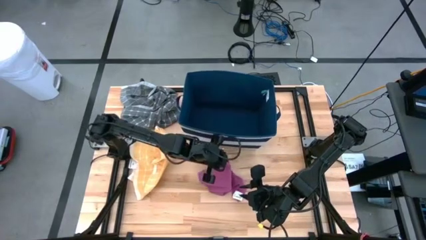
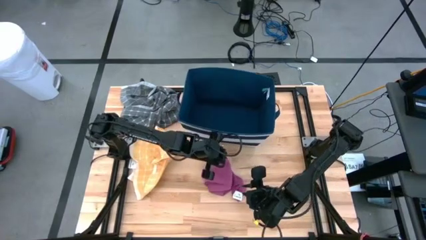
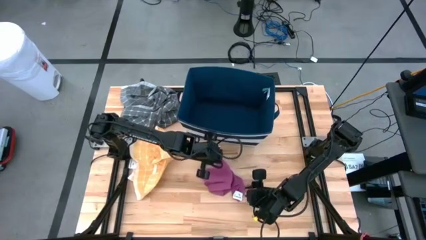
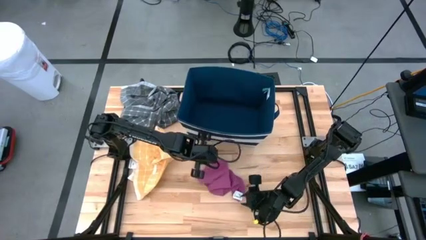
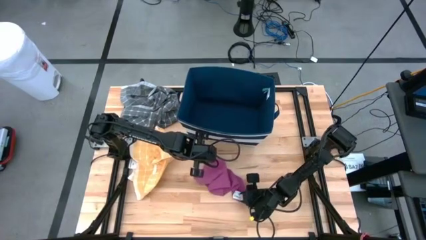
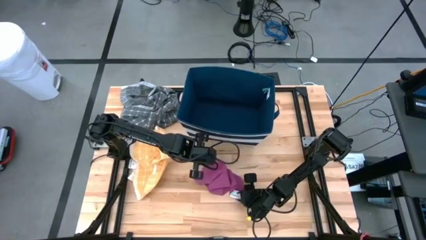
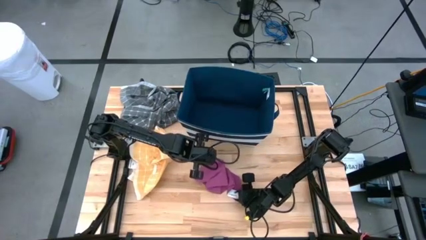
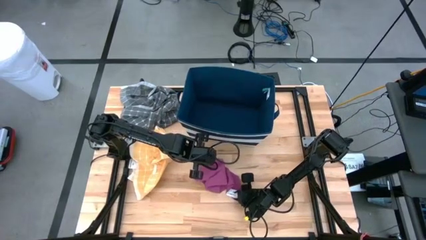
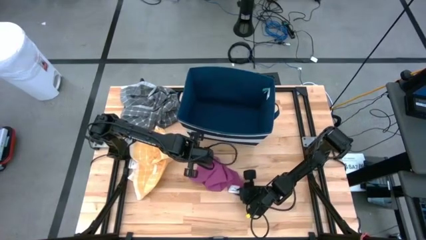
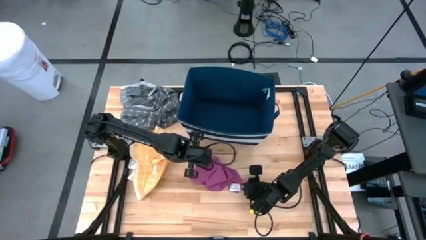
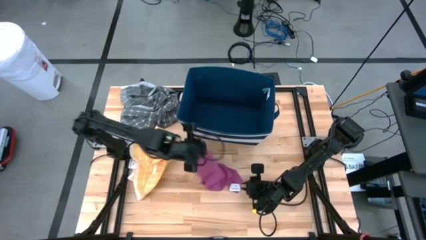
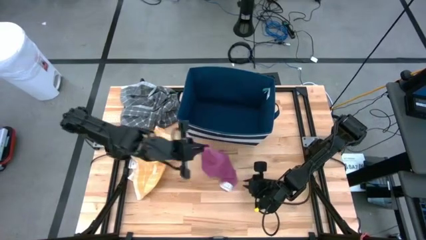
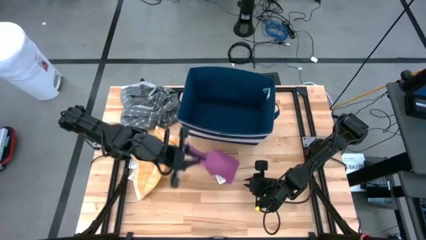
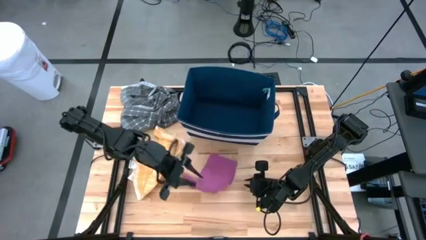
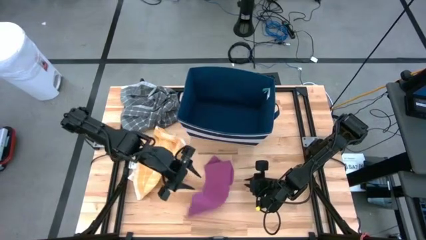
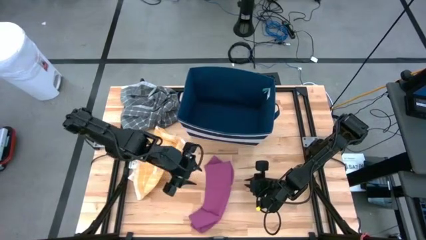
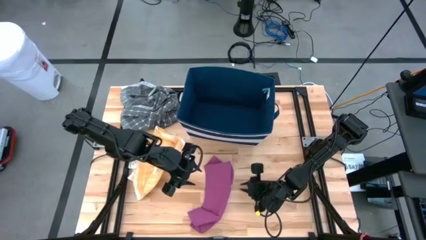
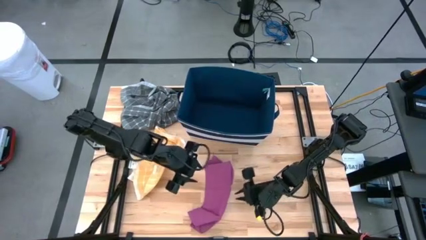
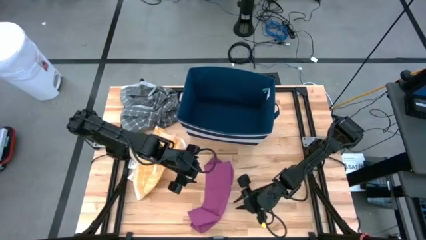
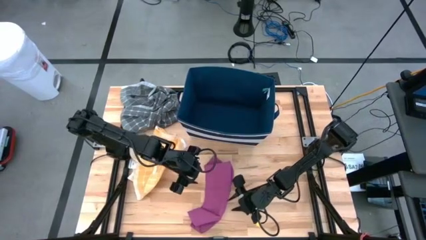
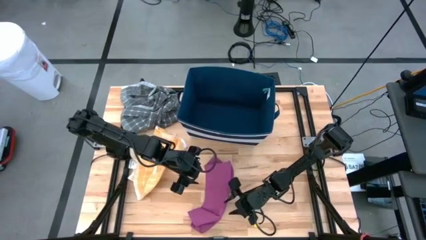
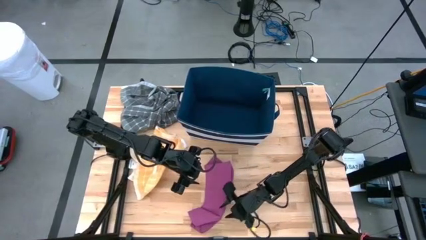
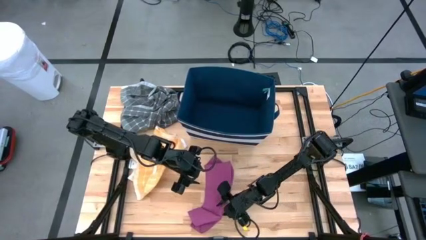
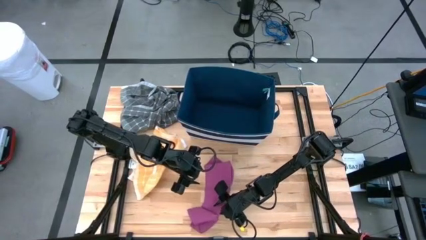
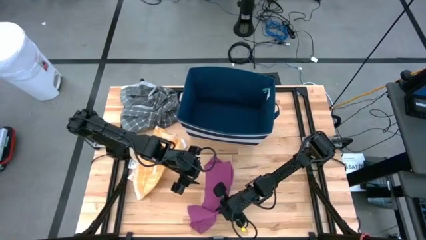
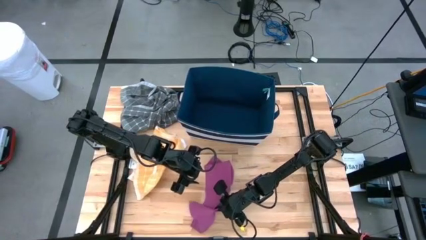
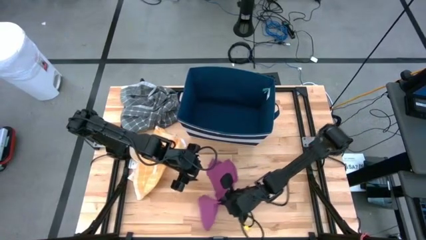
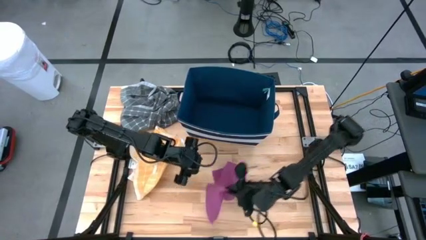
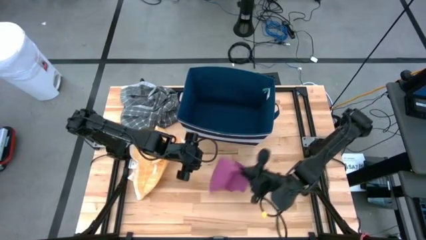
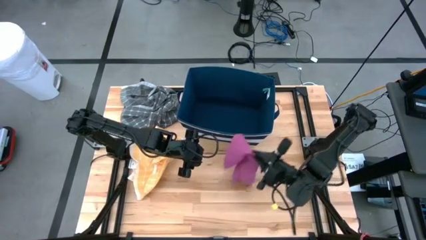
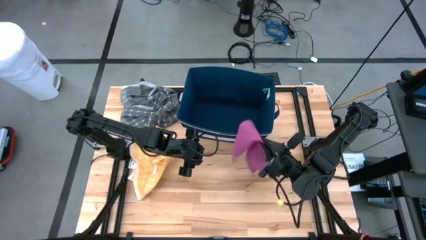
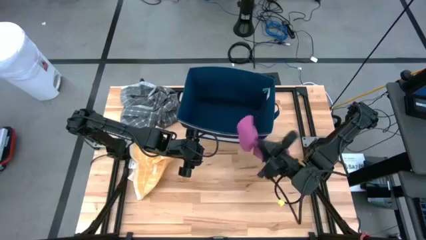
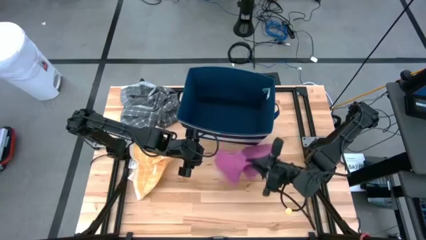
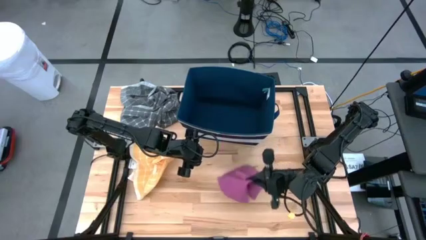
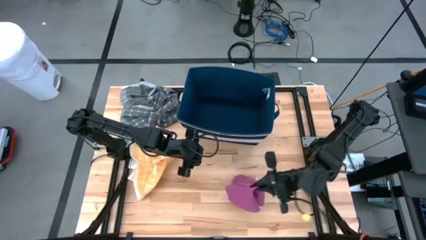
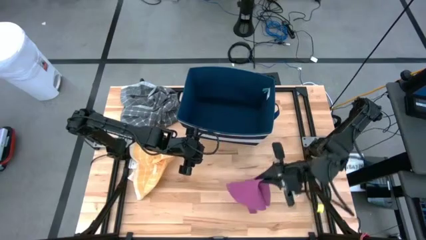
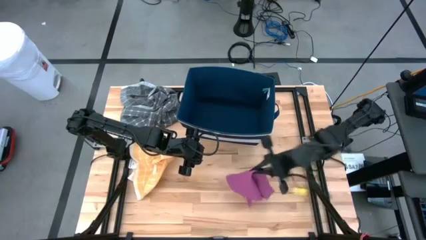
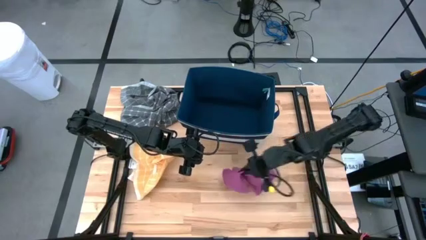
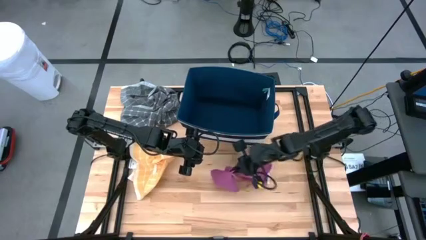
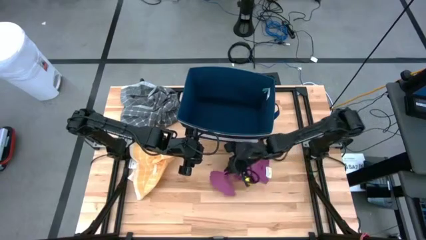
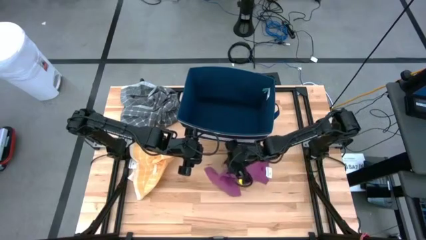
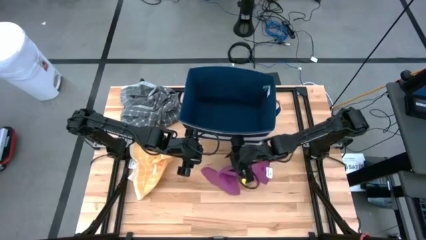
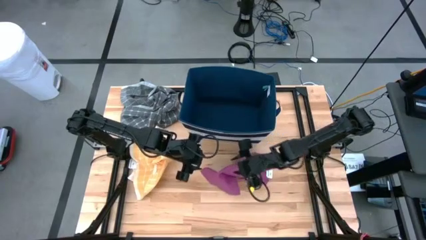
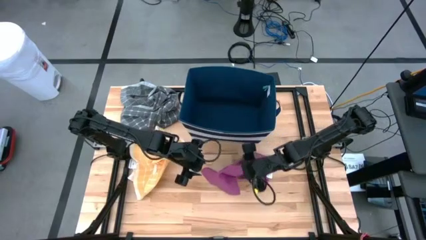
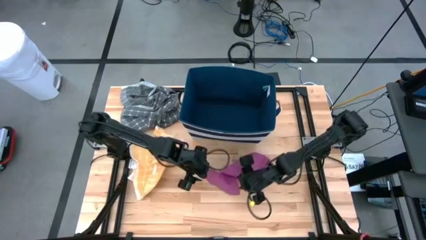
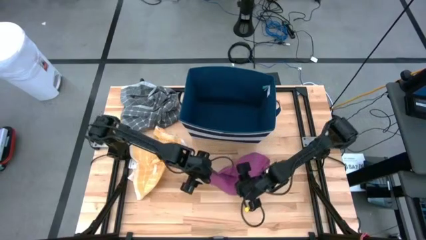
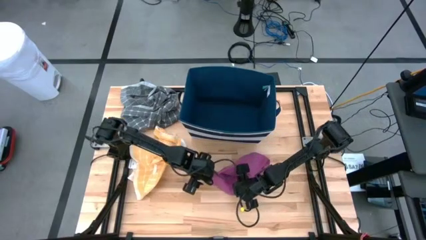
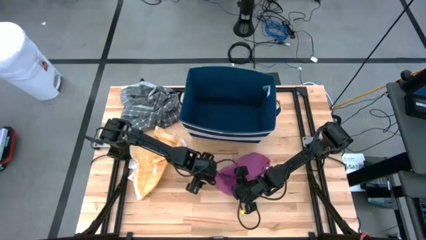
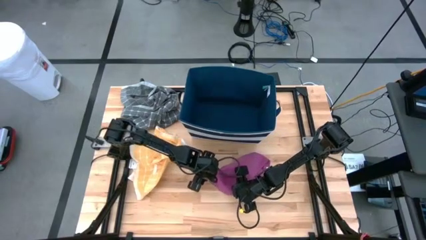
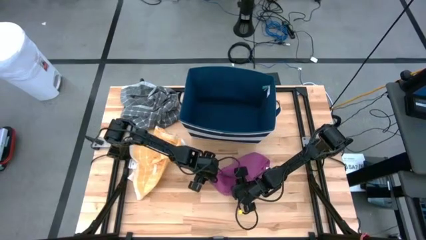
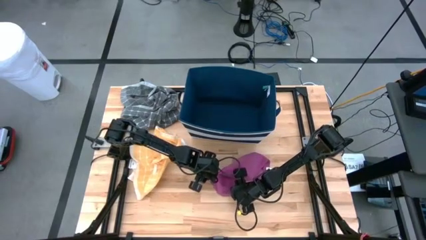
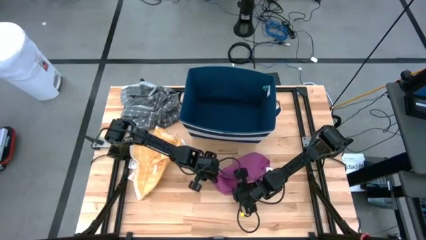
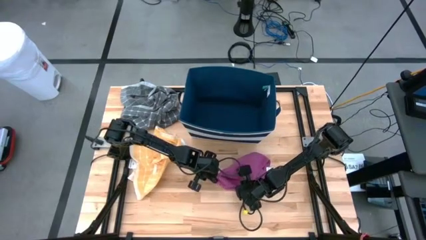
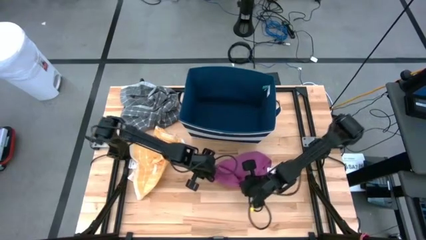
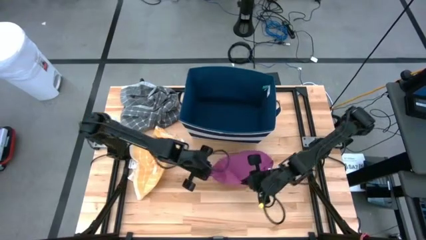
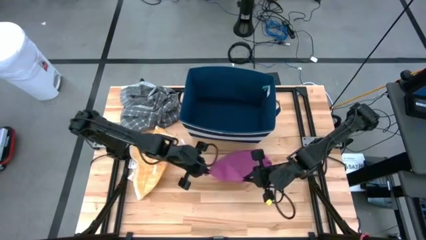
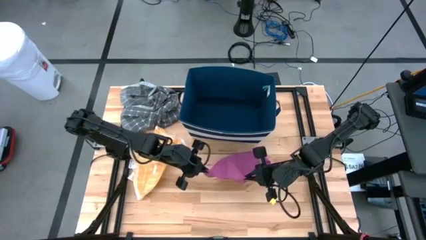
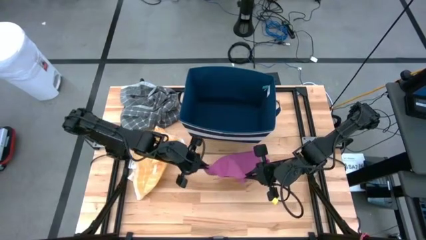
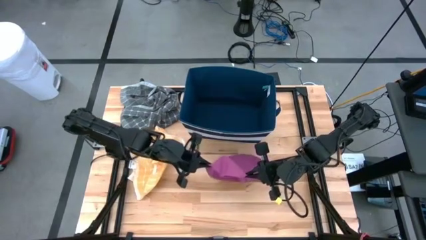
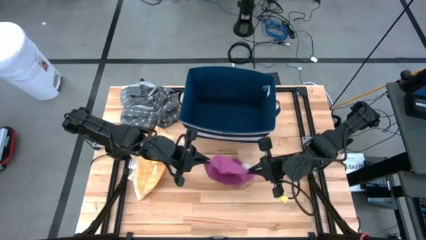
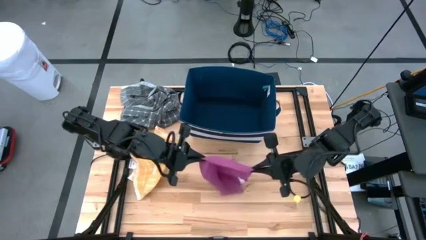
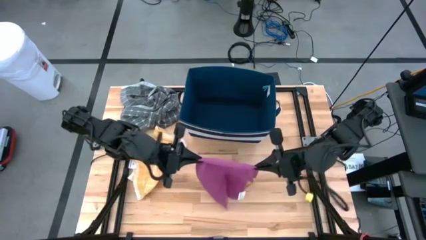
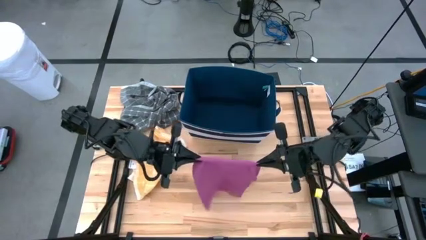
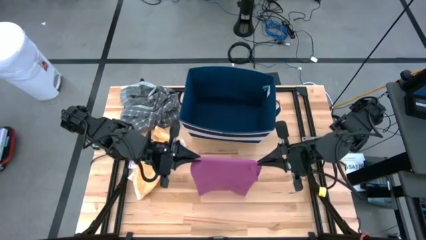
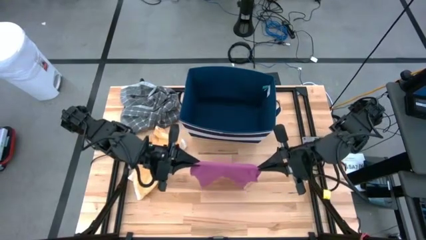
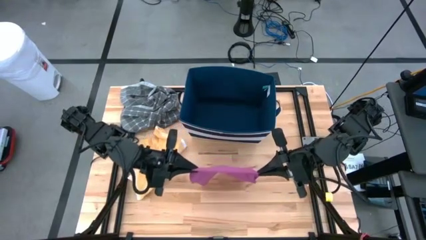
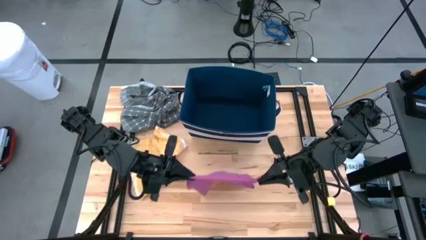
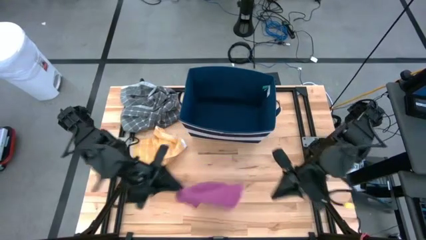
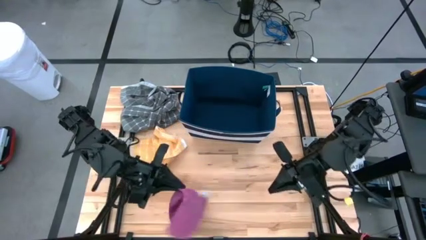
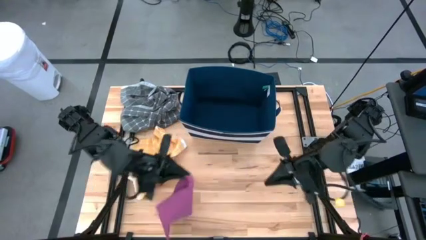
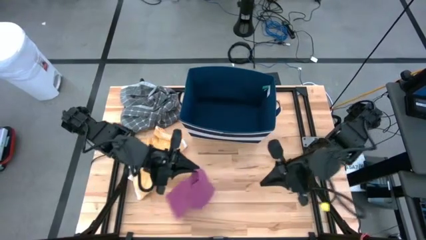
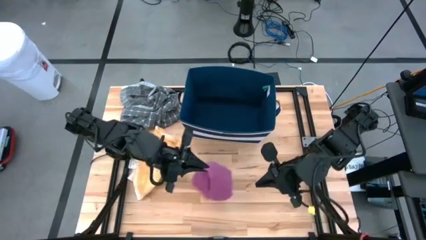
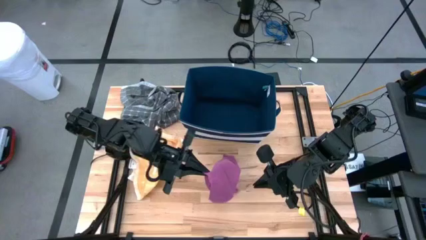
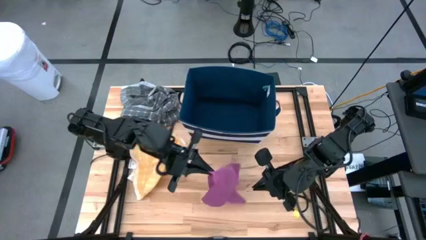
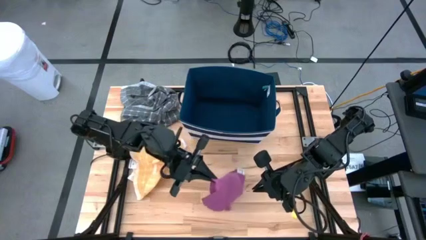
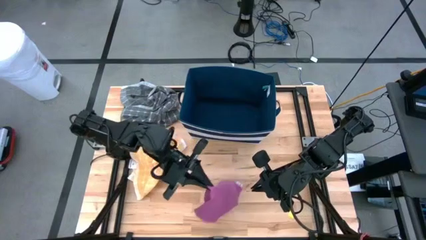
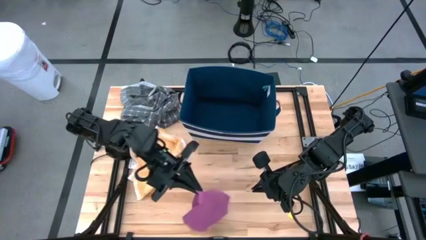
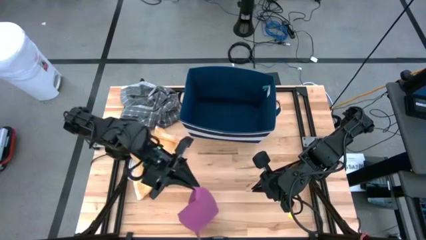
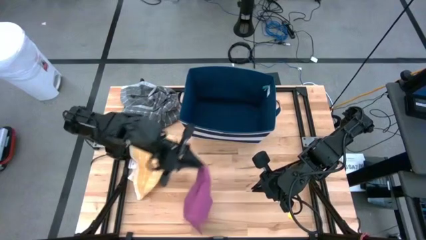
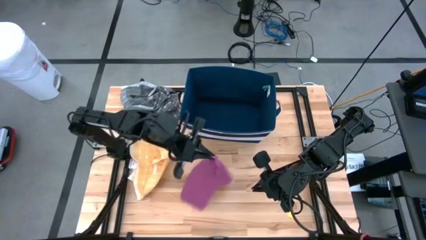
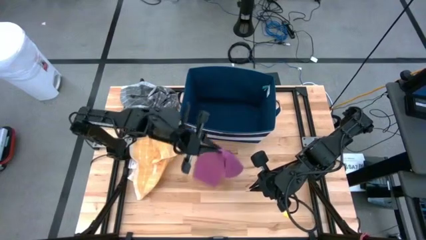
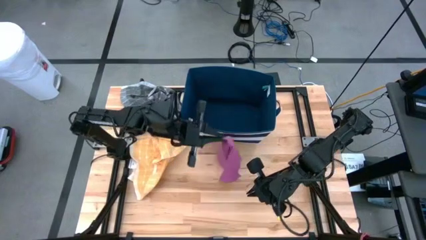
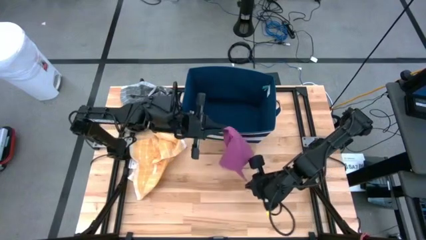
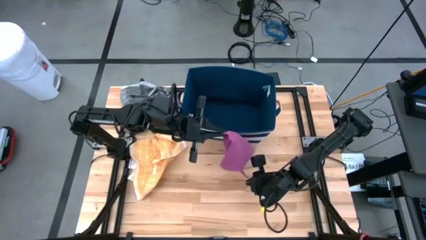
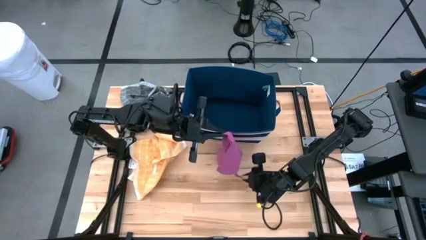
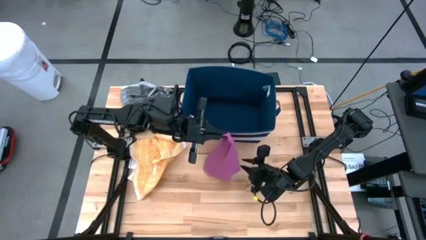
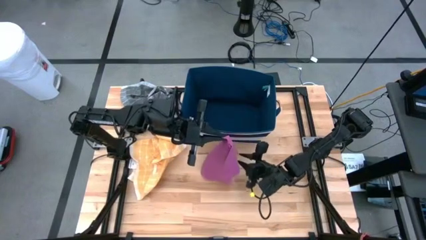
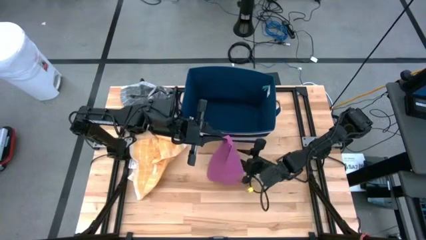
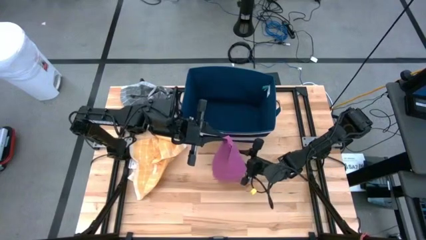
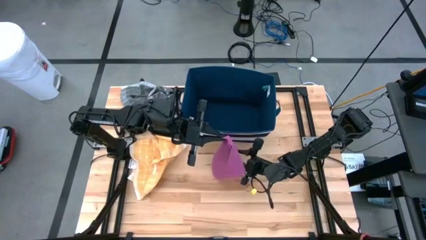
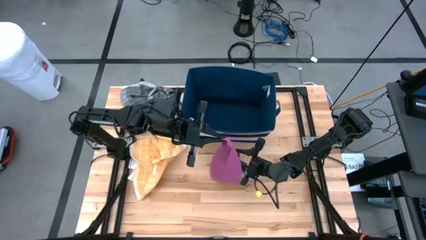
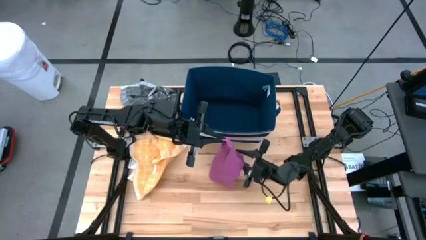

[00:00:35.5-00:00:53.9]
Task: Fold towel
Fold the purple towel
